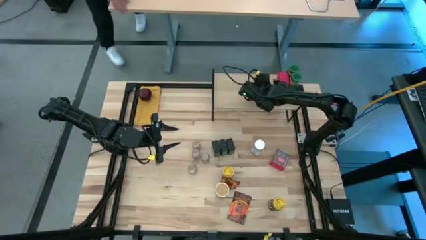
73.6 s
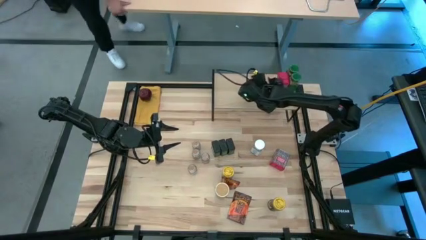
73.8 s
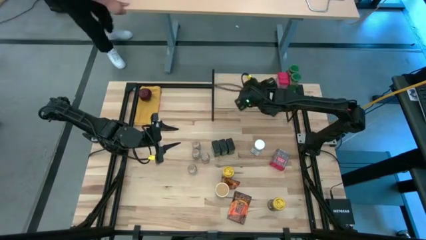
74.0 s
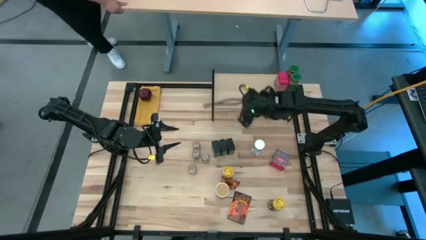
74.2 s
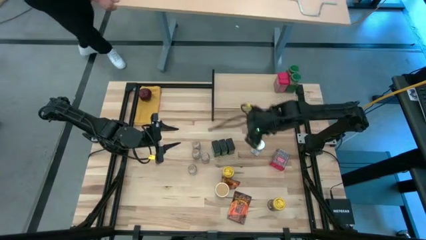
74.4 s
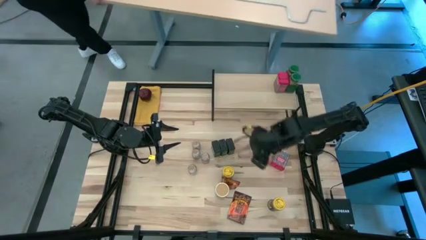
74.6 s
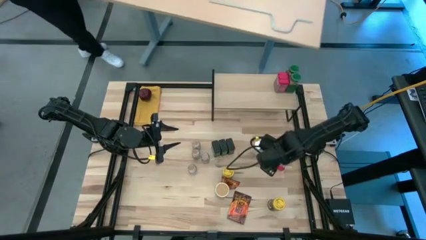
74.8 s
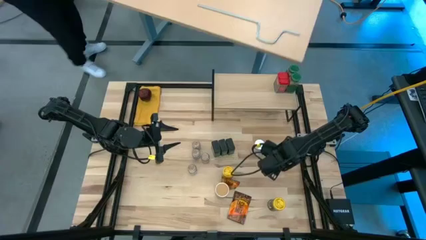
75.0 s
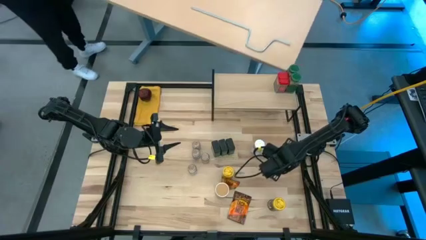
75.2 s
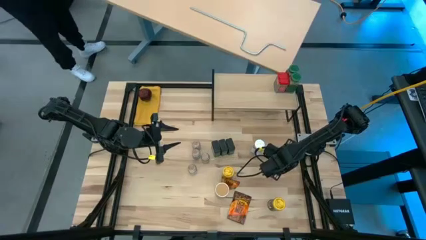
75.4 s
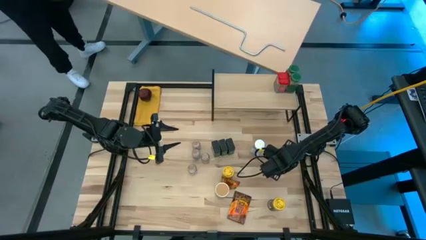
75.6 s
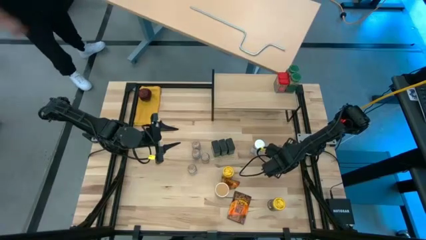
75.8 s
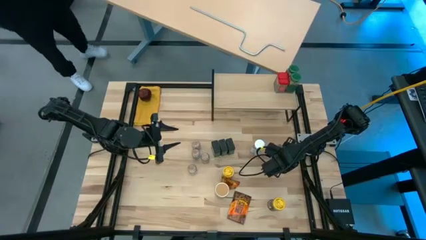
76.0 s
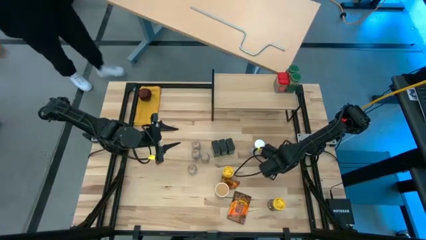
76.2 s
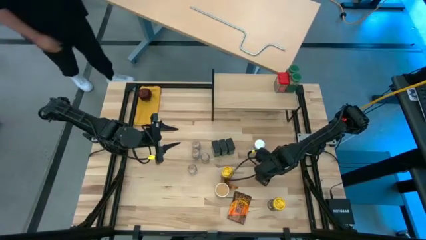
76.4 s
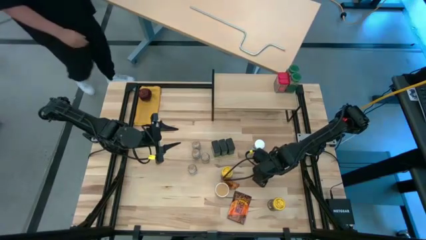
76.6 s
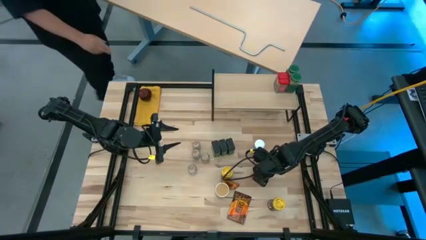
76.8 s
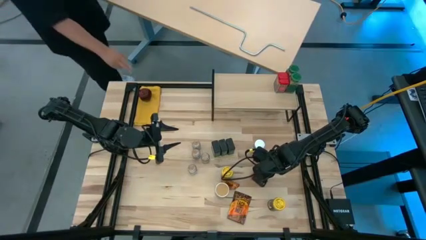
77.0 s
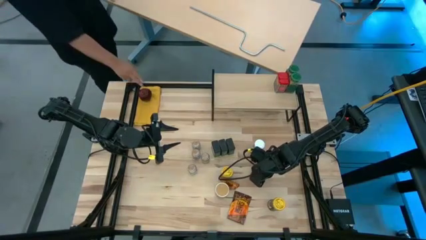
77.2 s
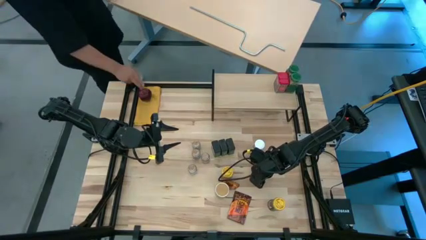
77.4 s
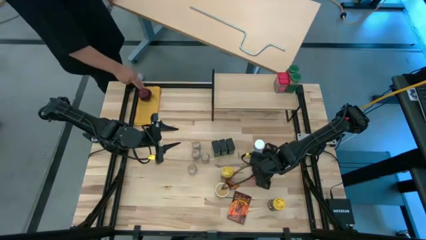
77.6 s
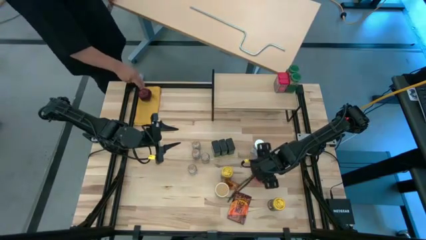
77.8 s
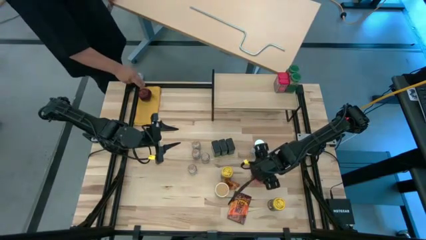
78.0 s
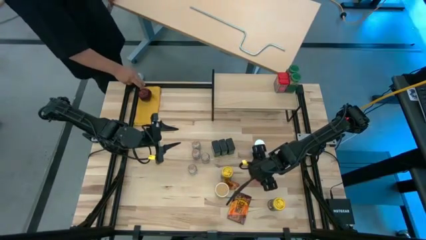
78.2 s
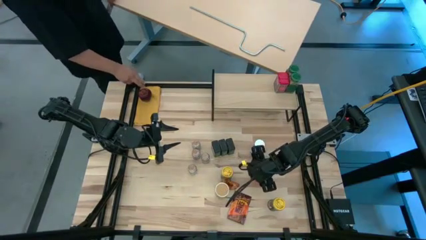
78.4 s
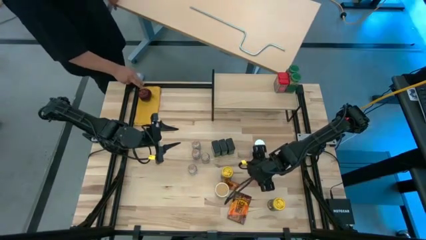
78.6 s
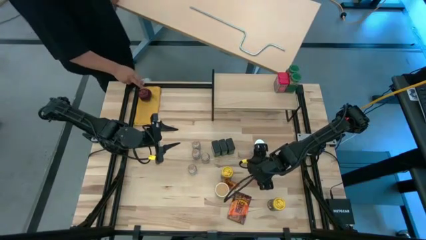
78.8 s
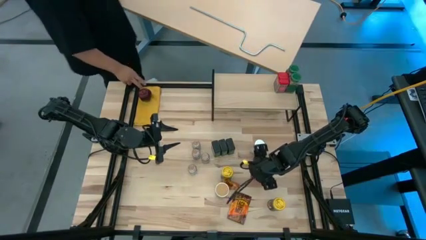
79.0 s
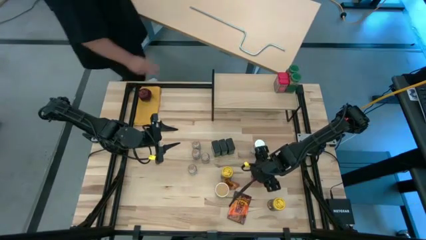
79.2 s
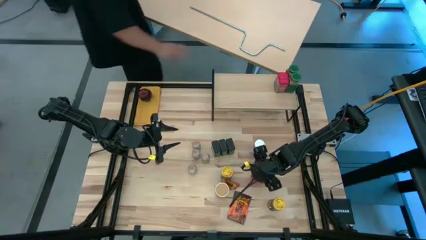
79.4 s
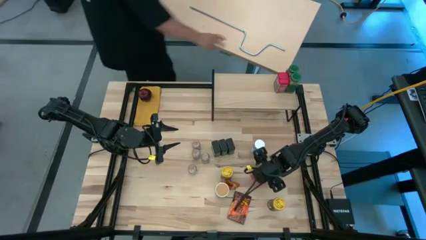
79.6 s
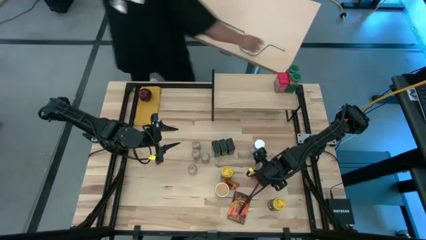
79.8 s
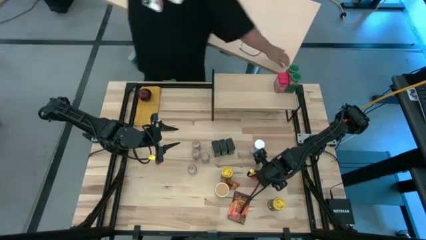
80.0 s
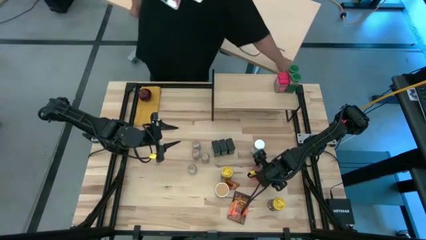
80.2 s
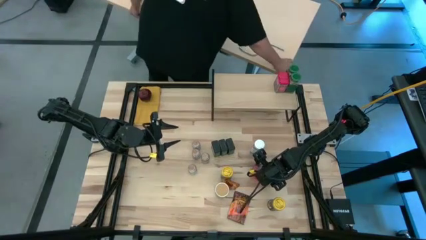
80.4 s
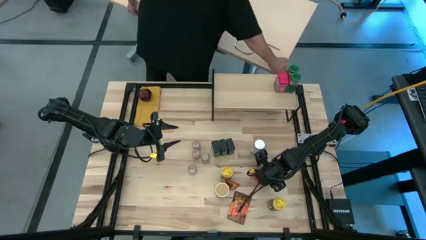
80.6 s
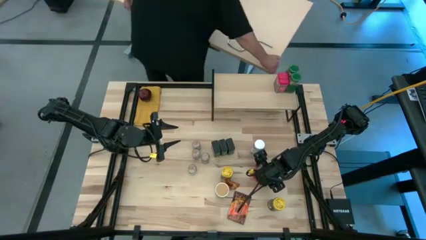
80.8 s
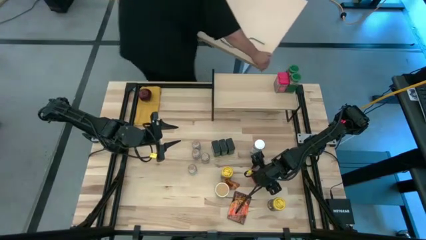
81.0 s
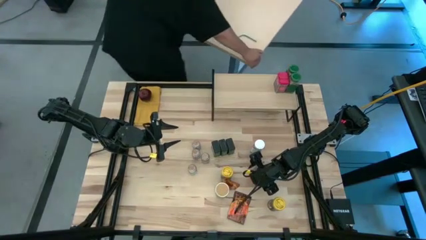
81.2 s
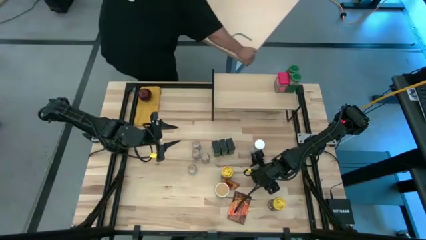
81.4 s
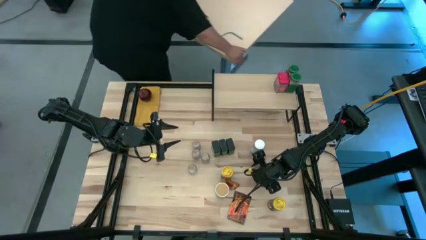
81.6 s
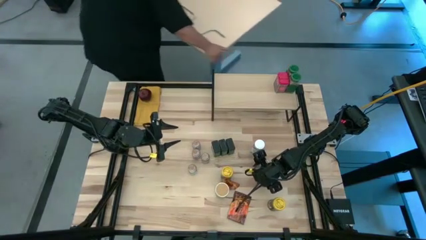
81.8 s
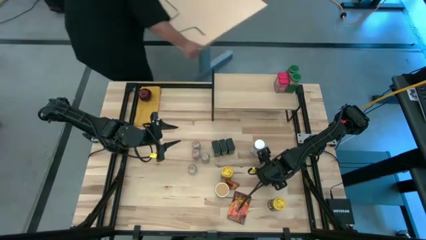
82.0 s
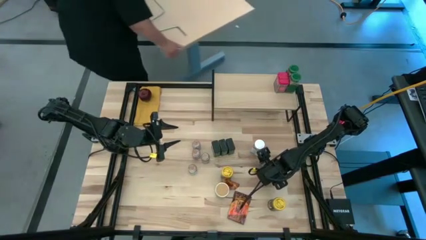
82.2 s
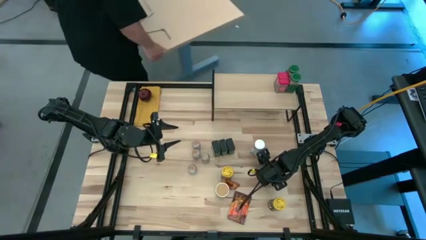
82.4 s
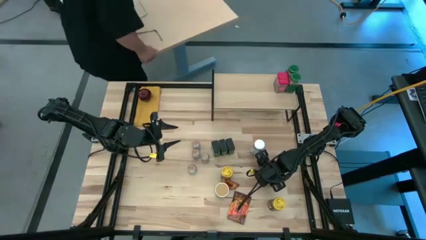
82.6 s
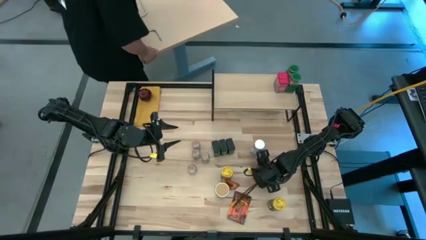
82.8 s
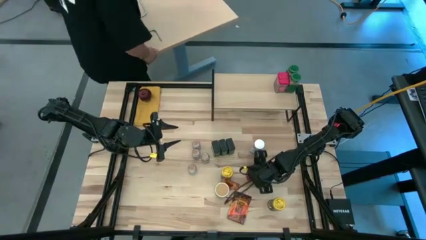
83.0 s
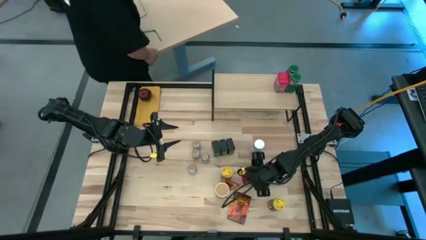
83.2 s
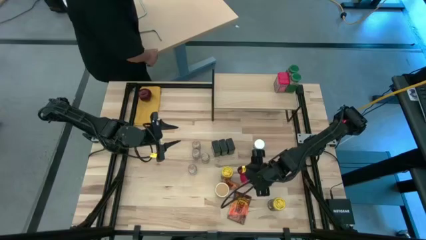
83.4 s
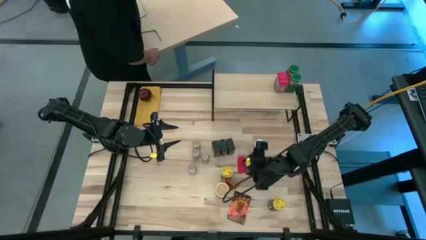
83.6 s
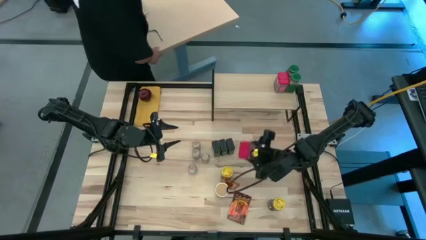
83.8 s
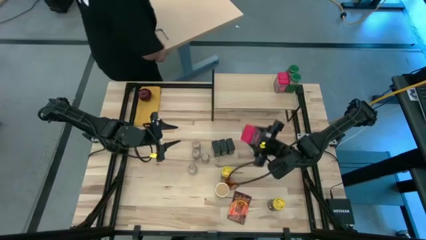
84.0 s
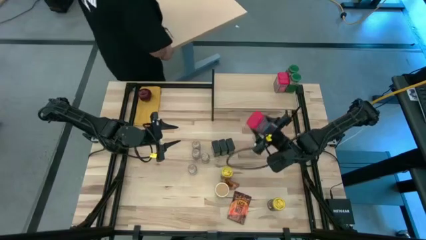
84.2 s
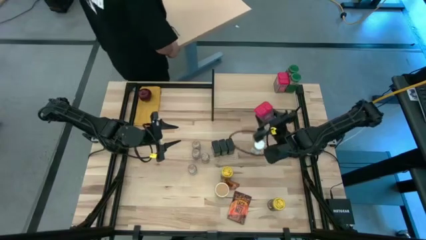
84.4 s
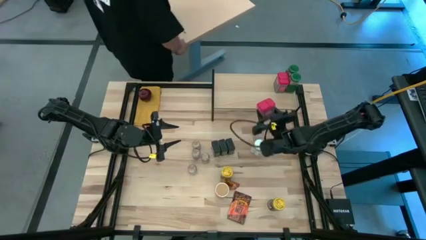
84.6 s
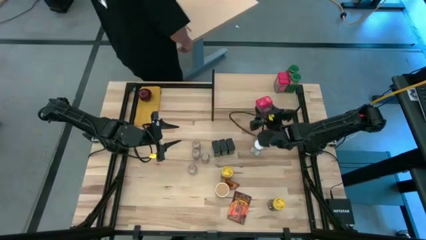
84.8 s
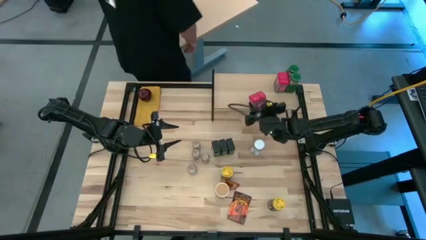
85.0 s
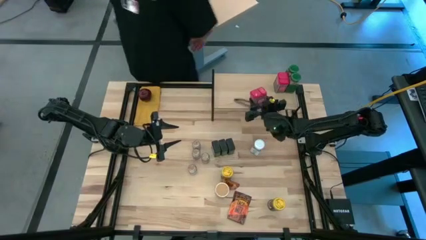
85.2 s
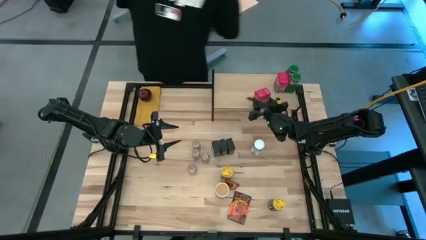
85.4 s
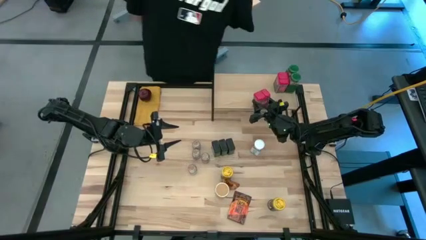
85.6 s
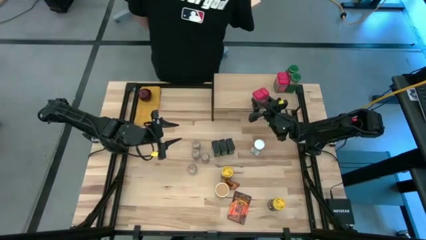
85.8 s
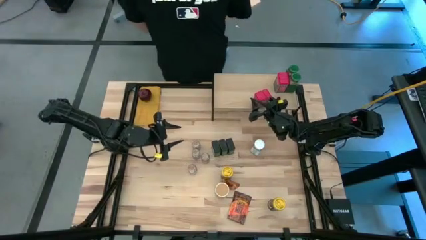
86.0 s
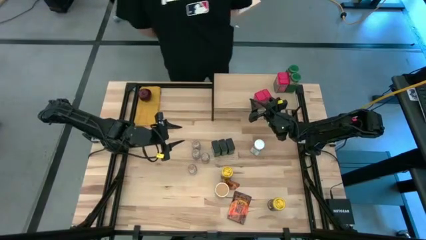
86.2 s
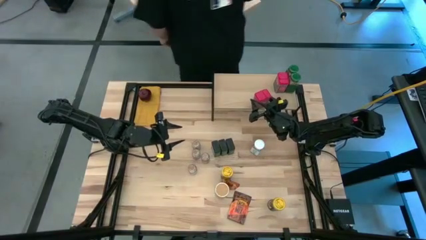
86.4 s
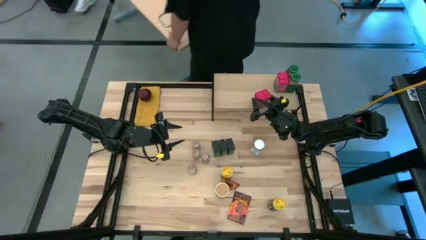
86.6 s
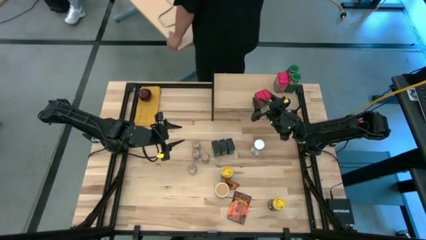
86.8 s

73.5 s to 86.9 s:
Task: Shelf spices
Put the red seasoning can on the shelf and align it with the other red seasoning can
